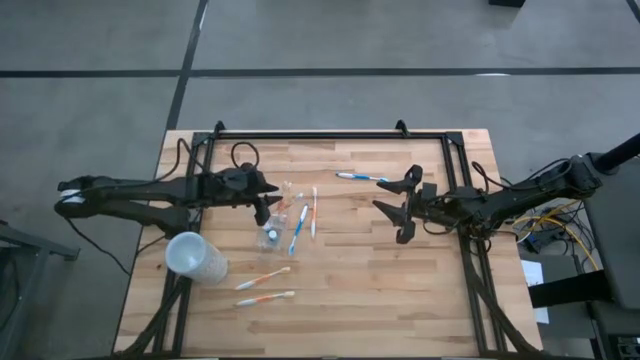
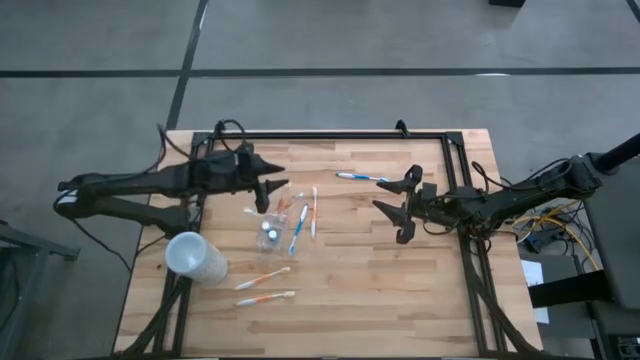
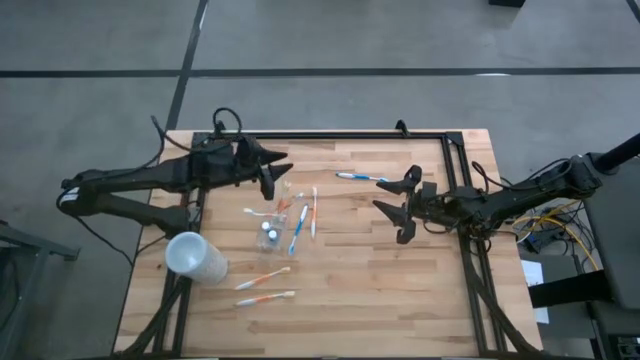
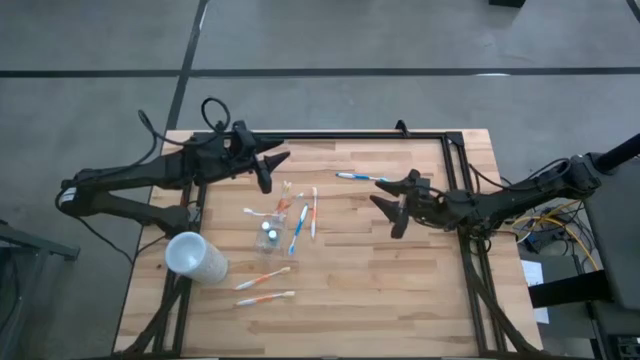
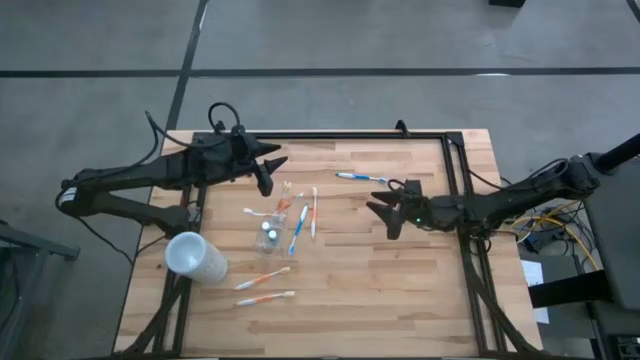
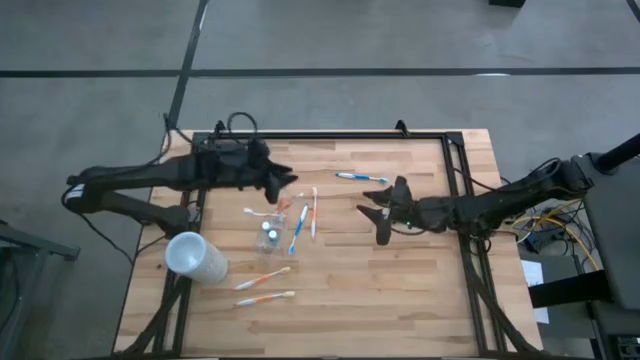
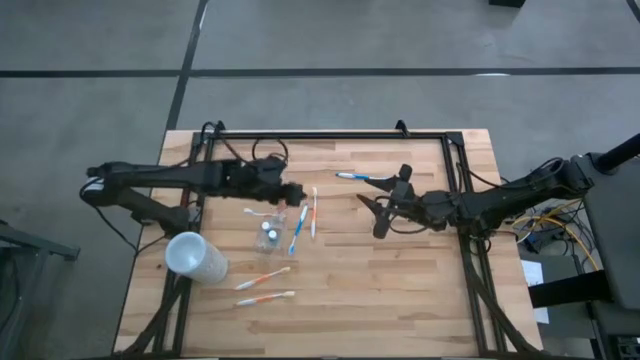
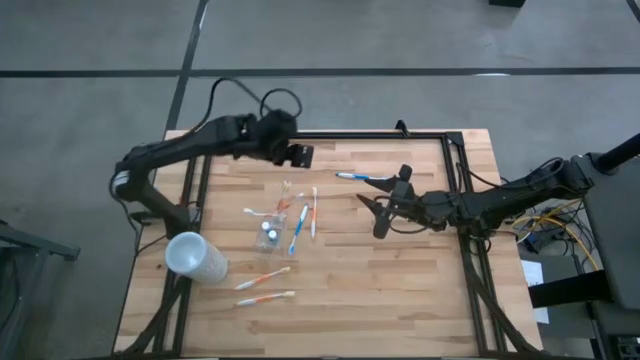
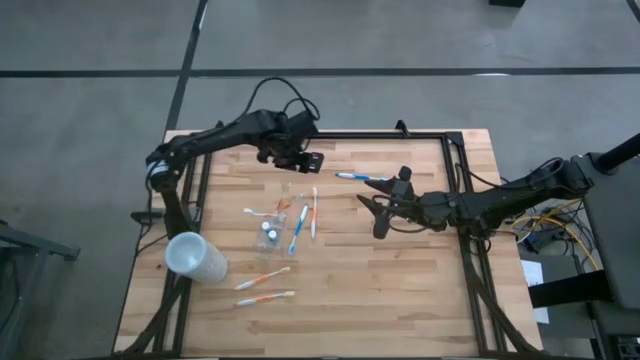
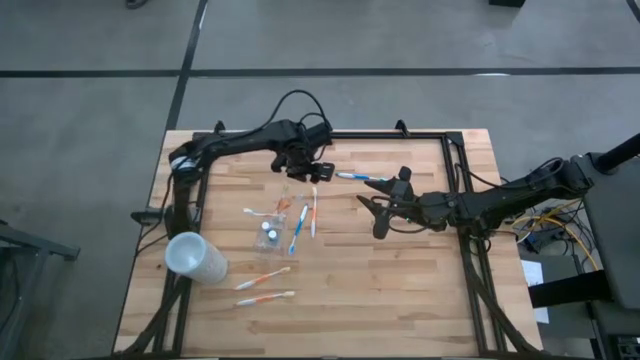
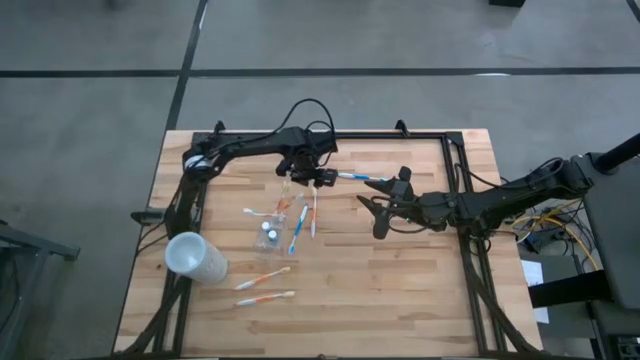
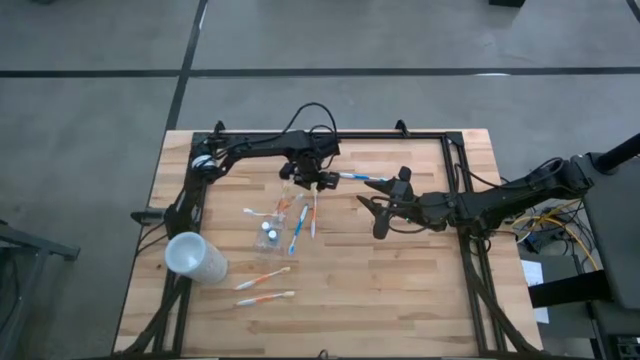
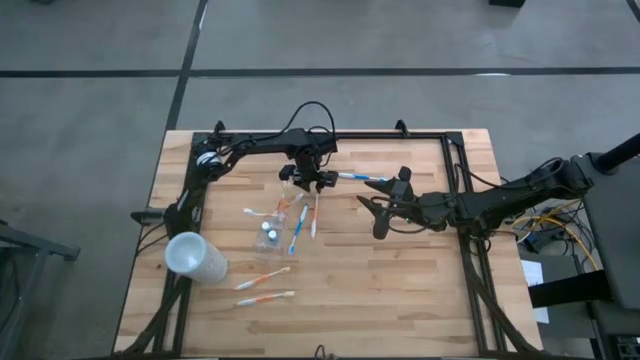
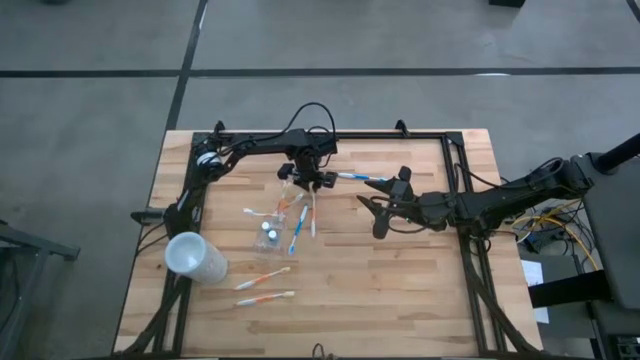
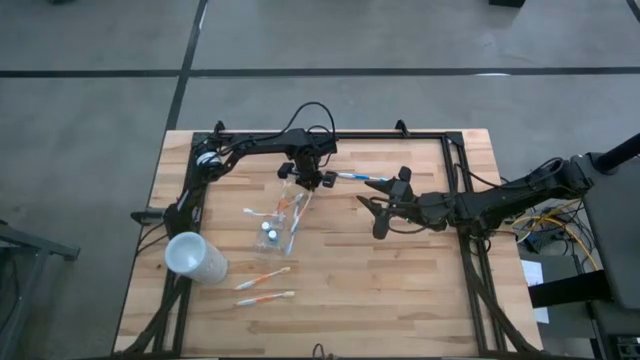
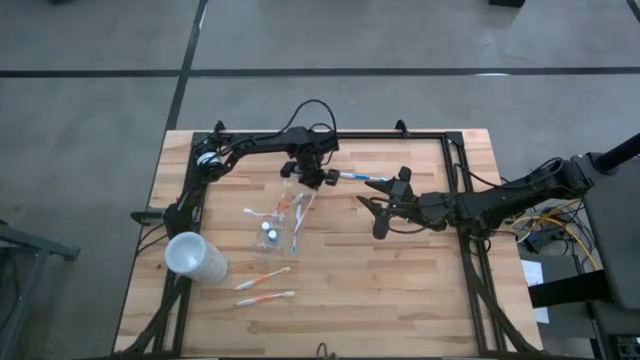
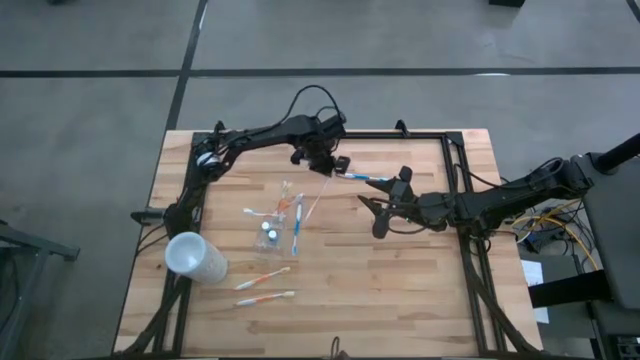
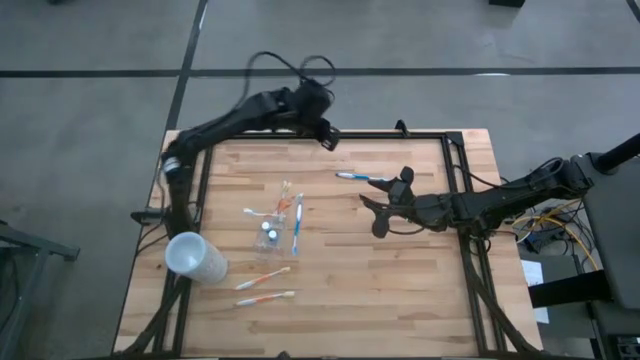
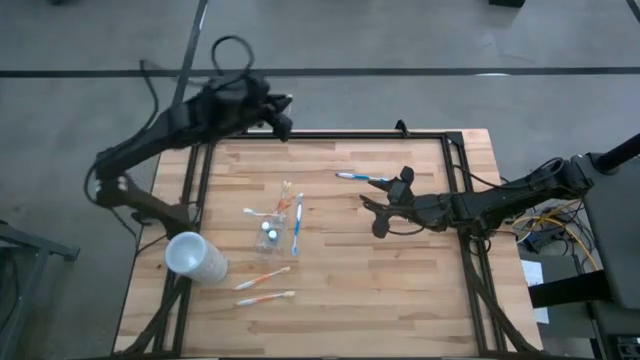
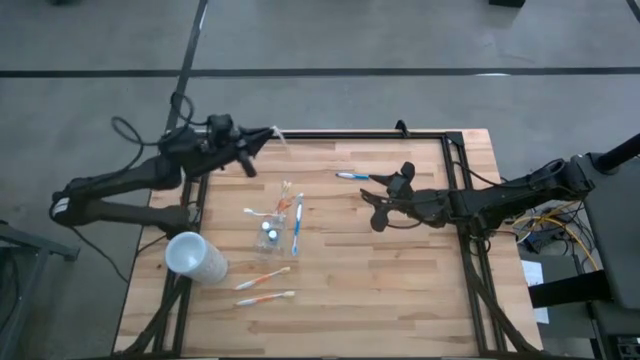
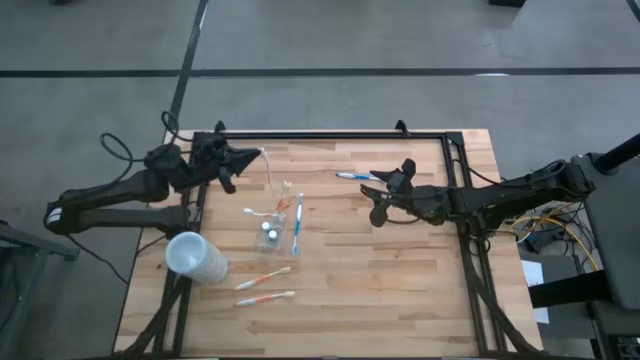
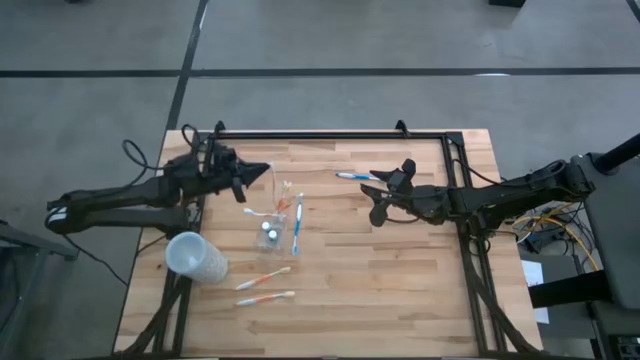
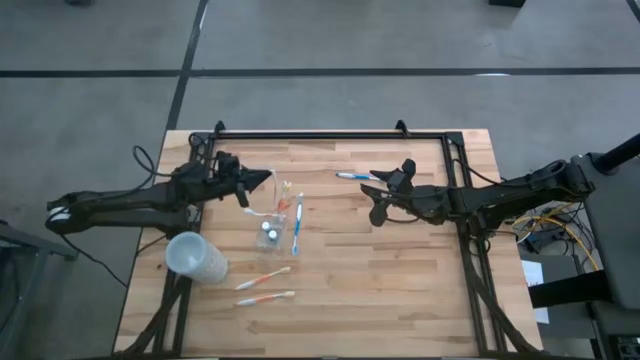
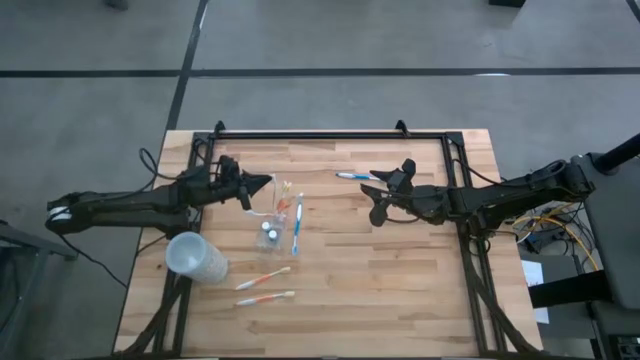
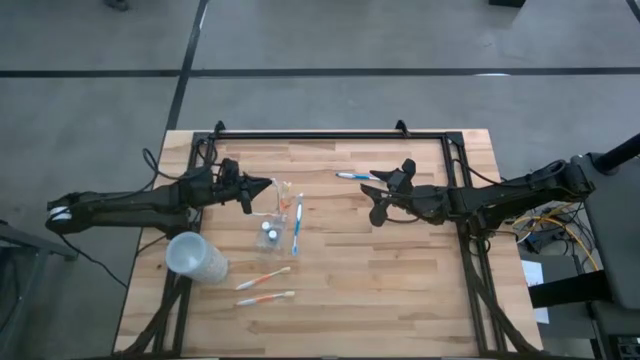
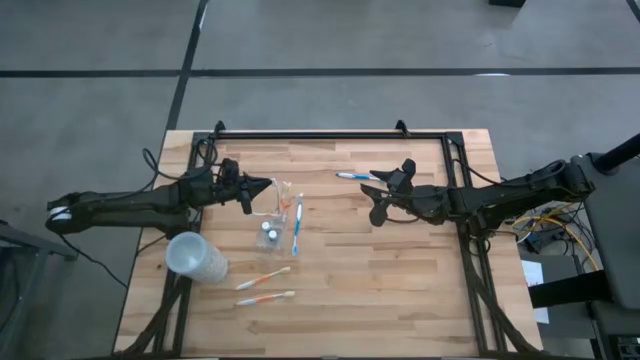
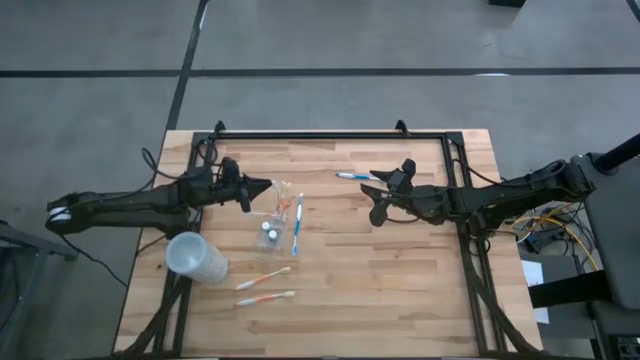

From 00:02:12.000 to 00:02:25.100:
Task: Pick & Place toothbrushing station
Put the orange toothbrush into the transparent organizer

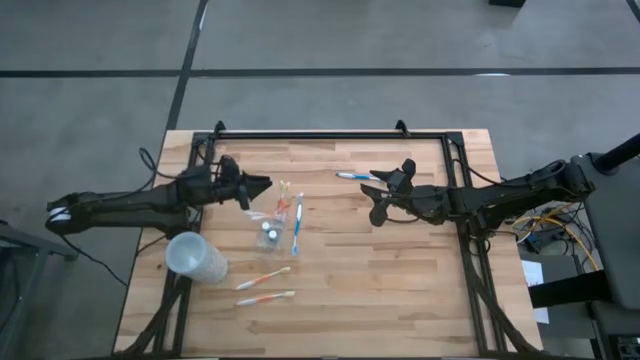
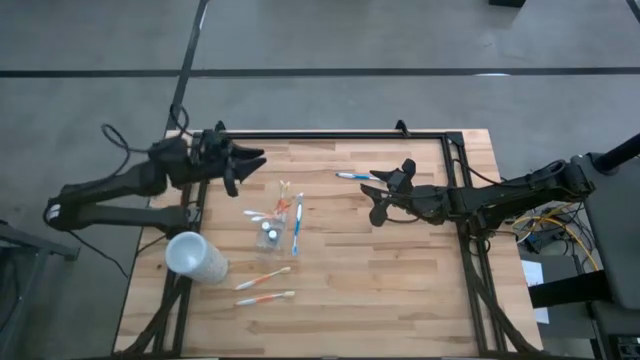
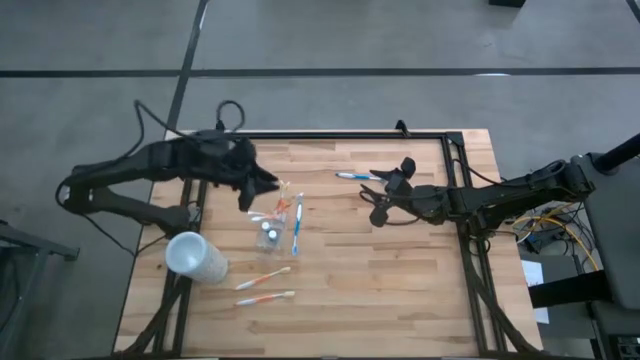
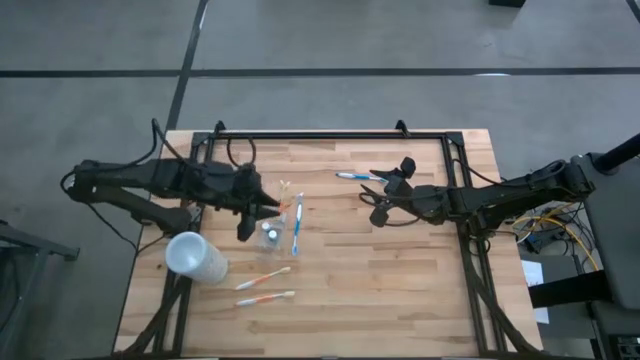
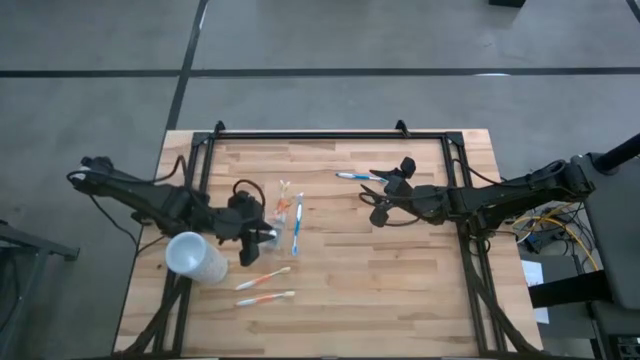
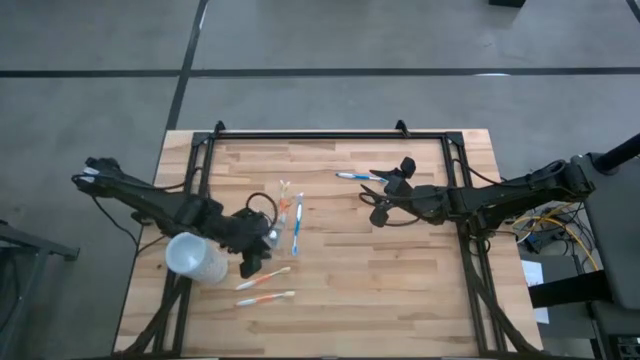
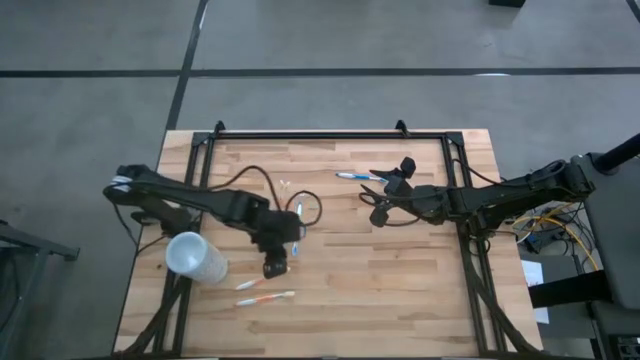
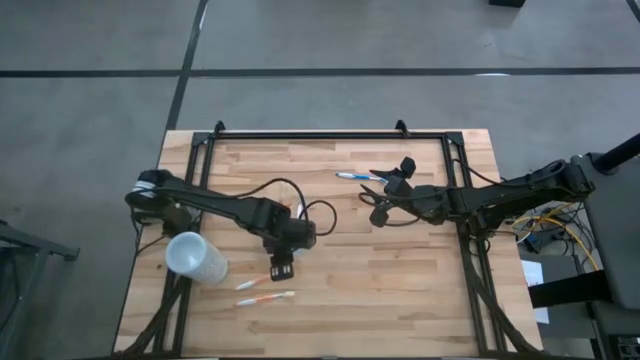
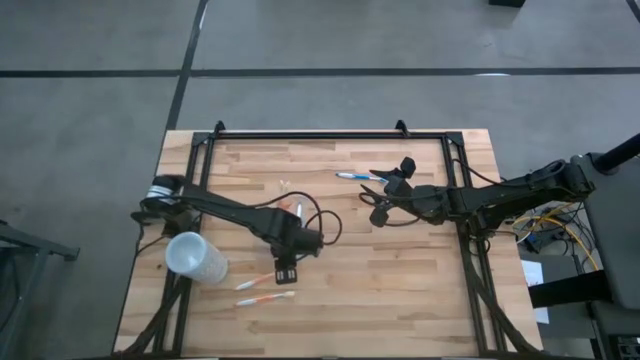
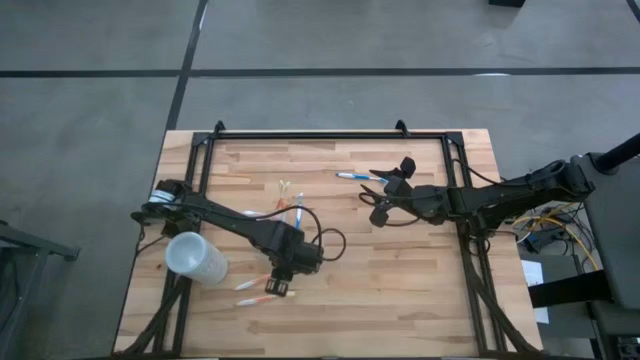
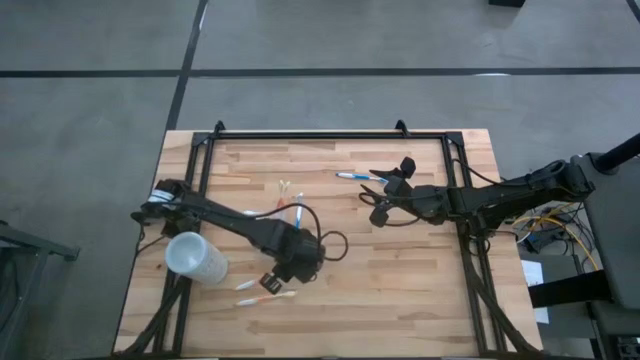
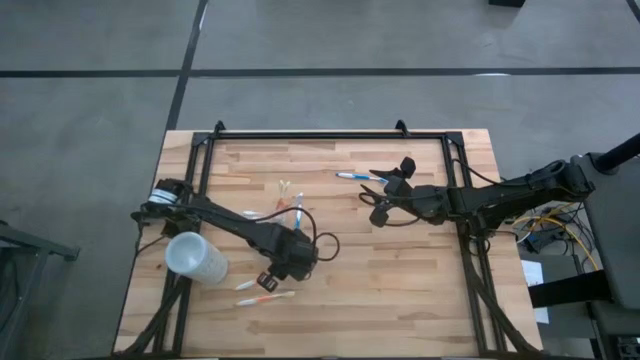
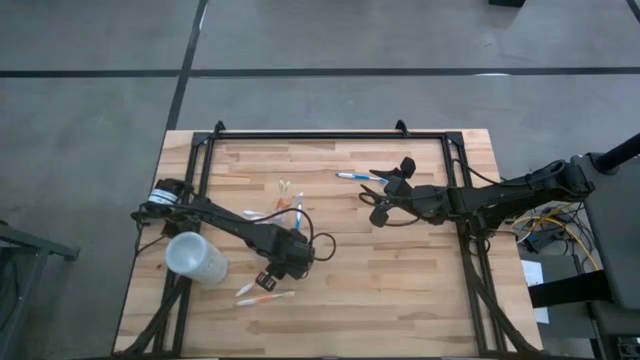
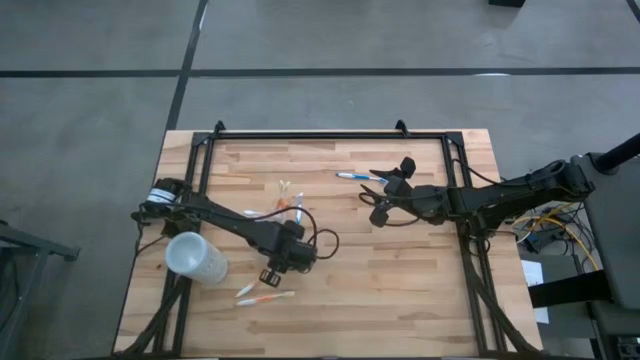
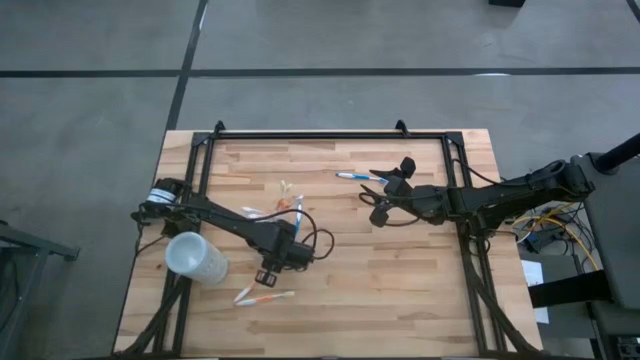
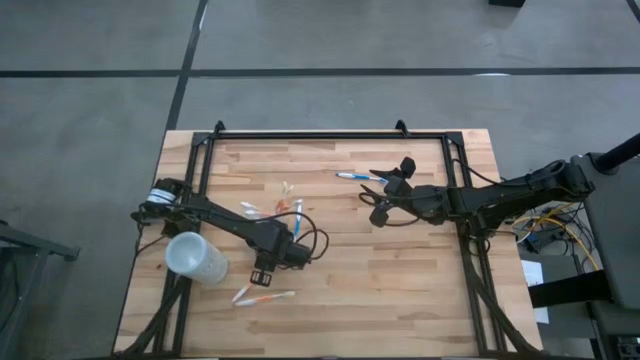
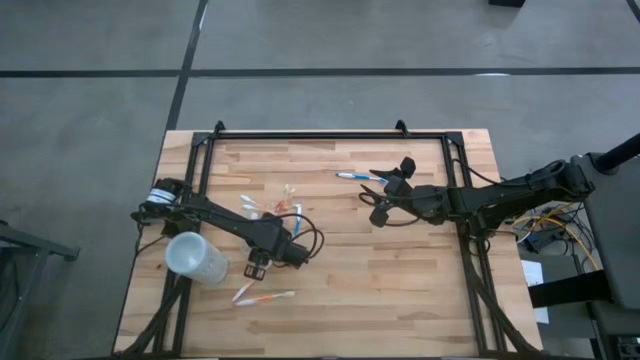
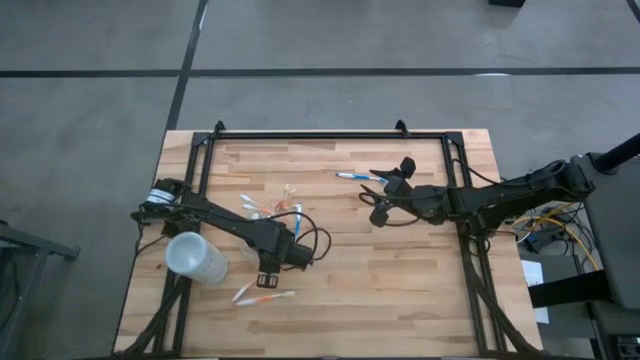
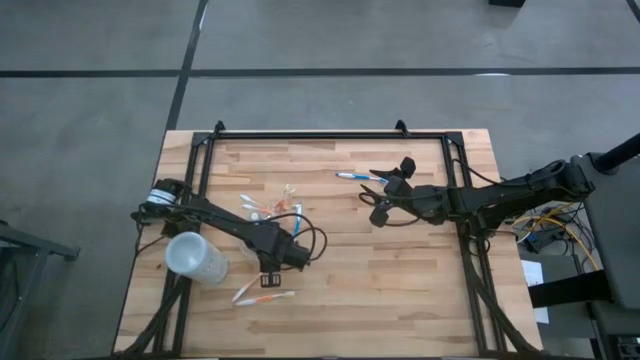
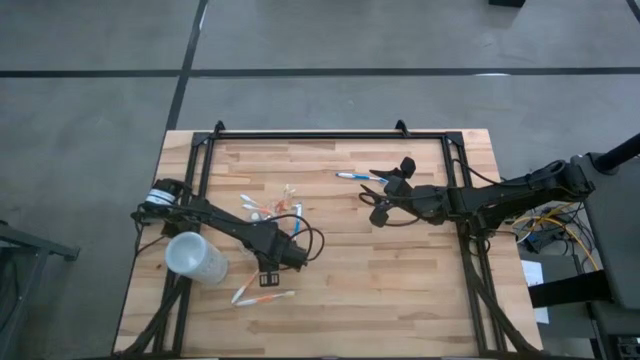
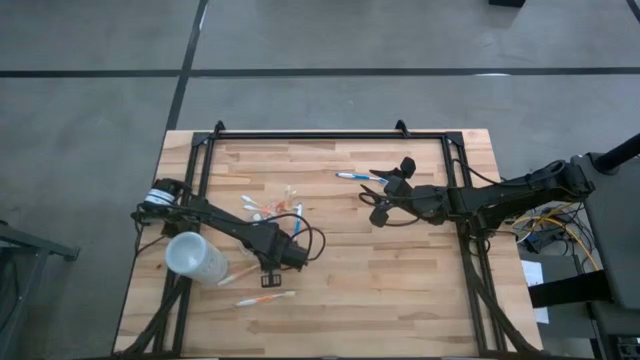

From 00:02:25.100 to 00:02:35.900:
Put the orange toothbrush into the transparent organizer
